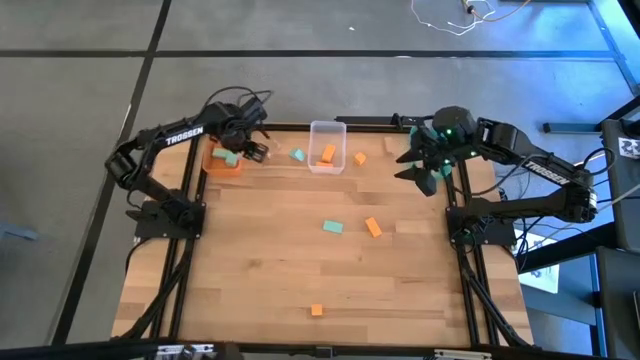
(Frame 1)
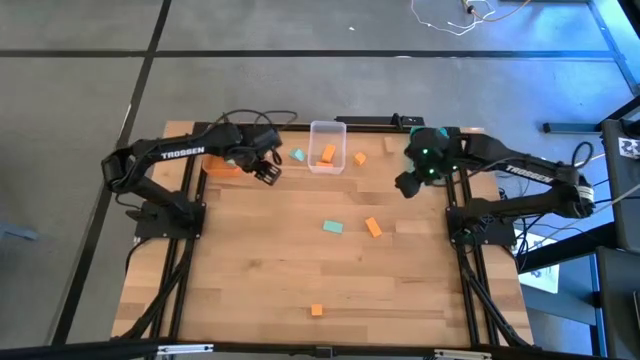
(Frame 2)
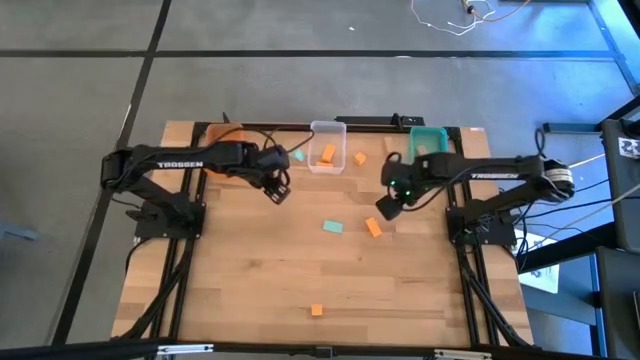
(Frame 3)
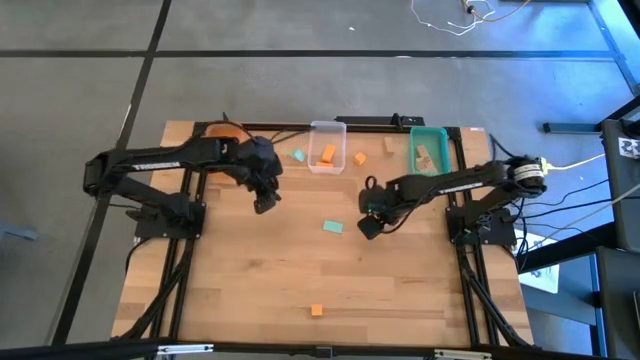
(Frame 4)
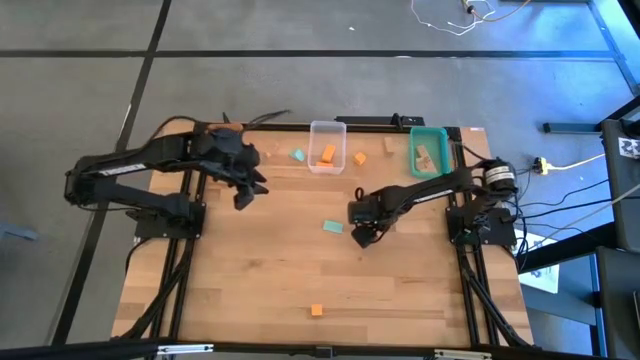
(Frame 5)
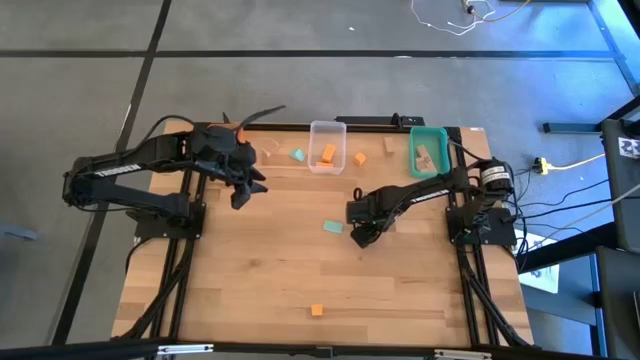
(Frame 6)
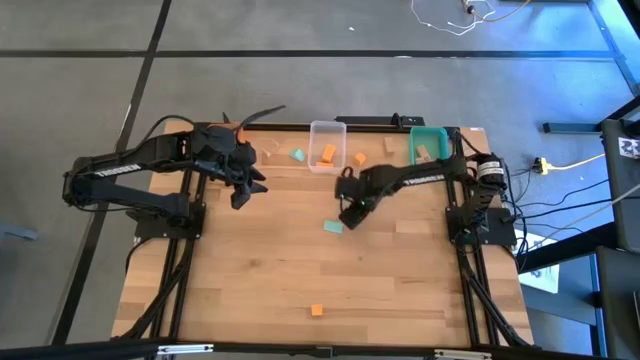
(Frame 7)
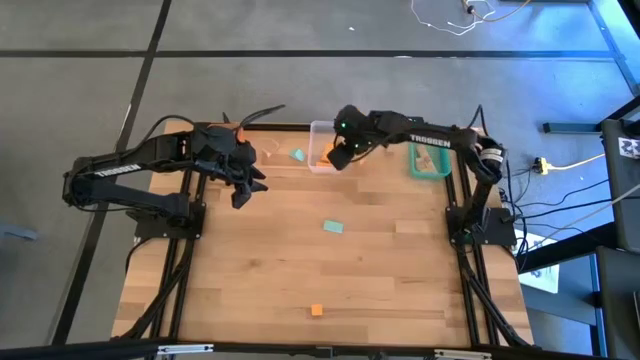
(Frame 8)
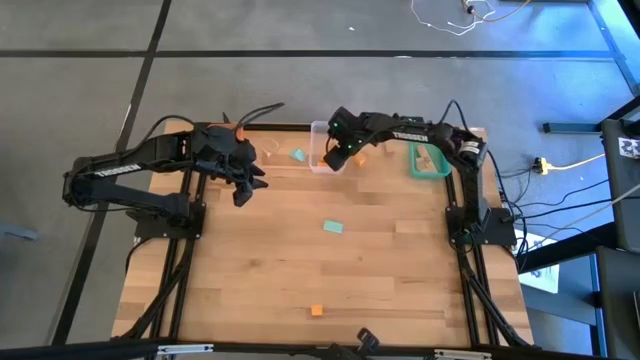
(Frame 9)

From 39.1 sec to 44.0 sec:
Task: Sort & place blocks by color
Put the orange block into the transparent bin

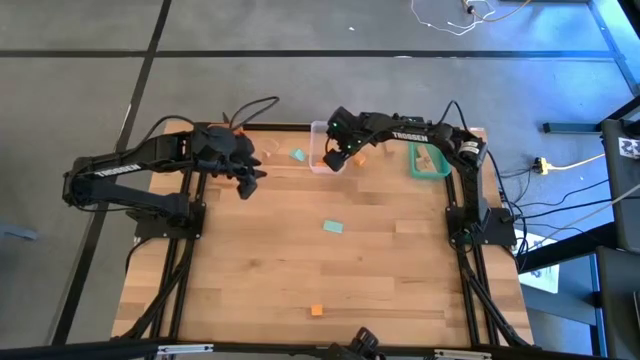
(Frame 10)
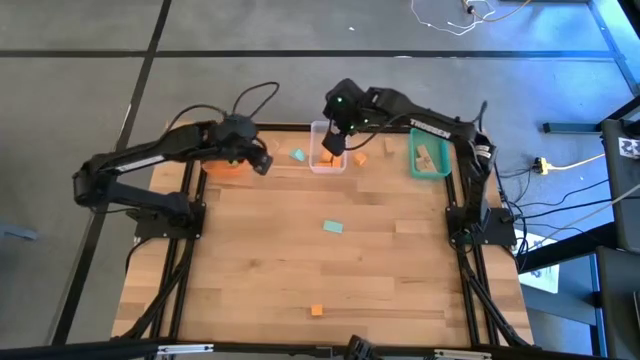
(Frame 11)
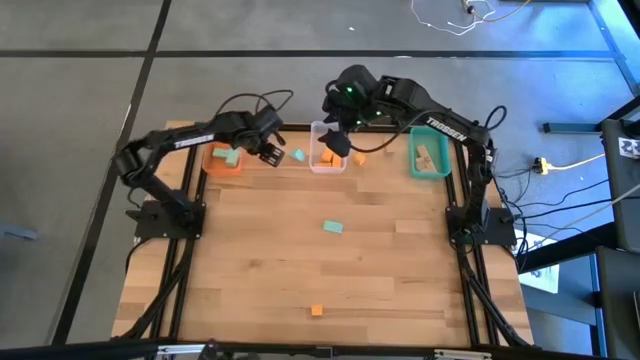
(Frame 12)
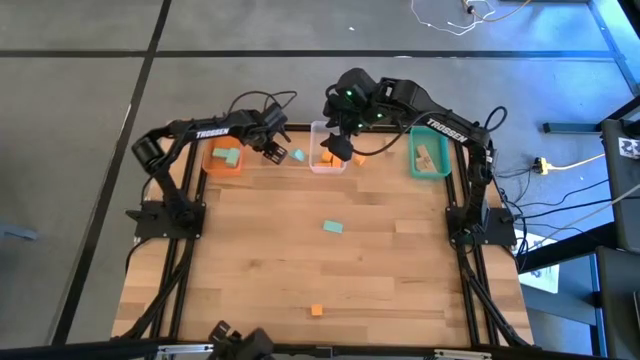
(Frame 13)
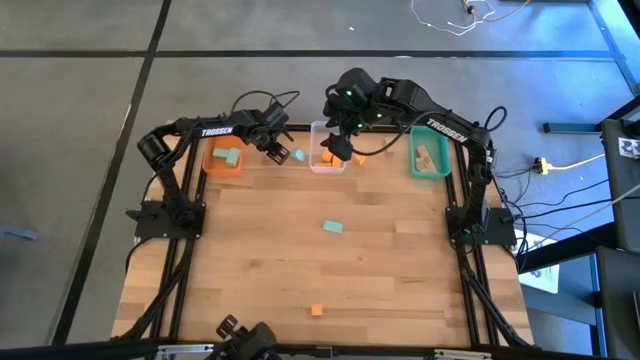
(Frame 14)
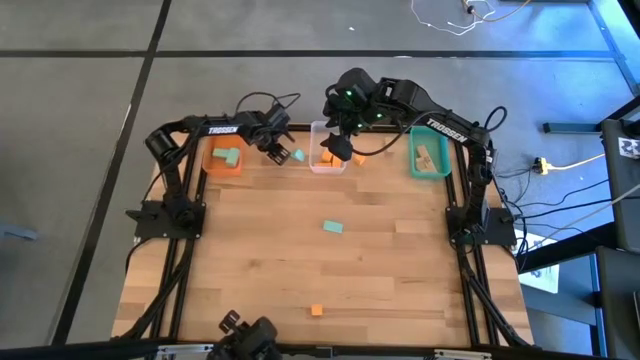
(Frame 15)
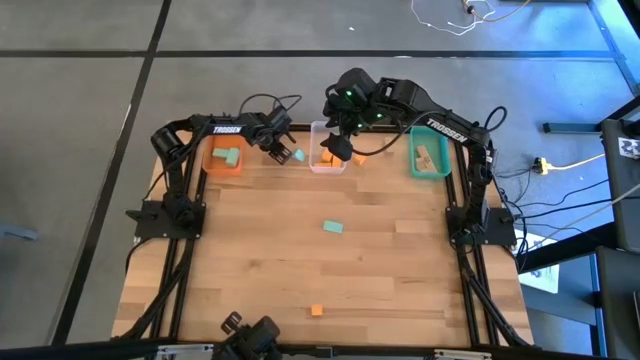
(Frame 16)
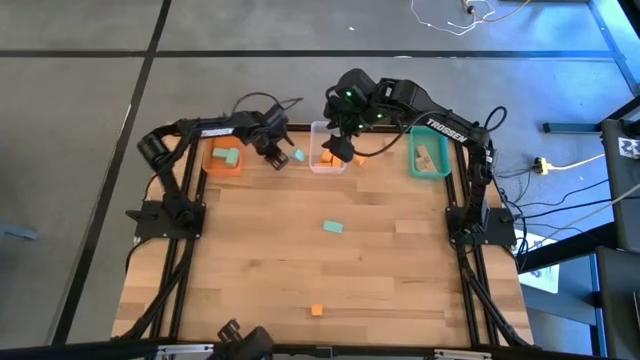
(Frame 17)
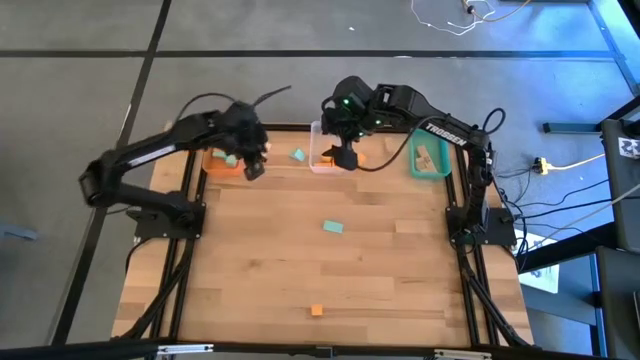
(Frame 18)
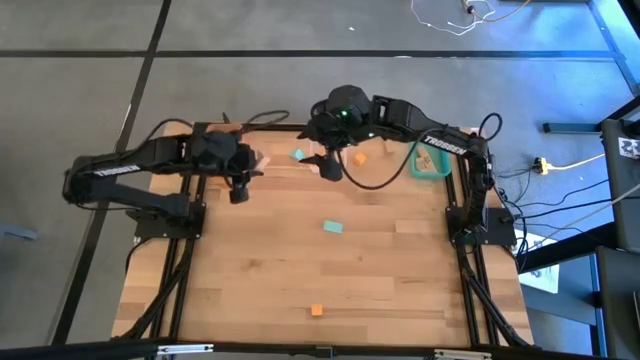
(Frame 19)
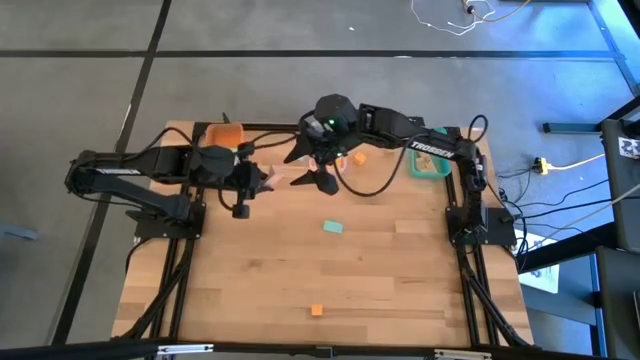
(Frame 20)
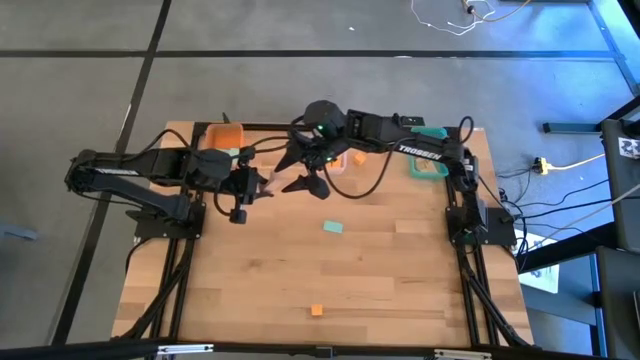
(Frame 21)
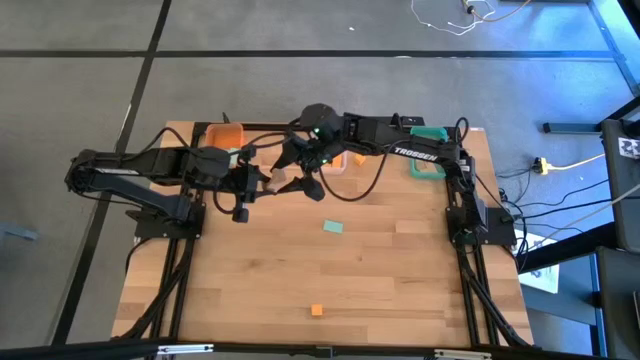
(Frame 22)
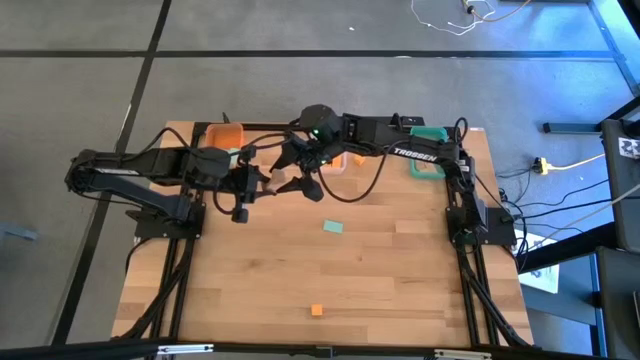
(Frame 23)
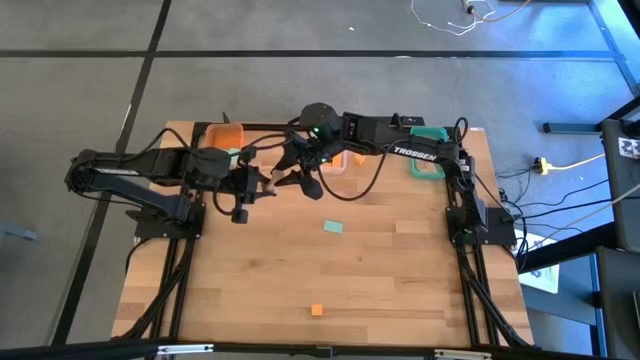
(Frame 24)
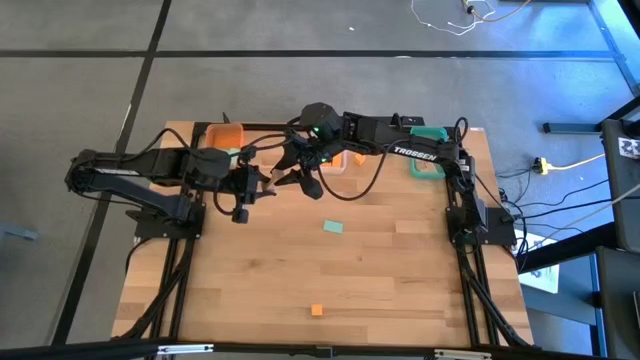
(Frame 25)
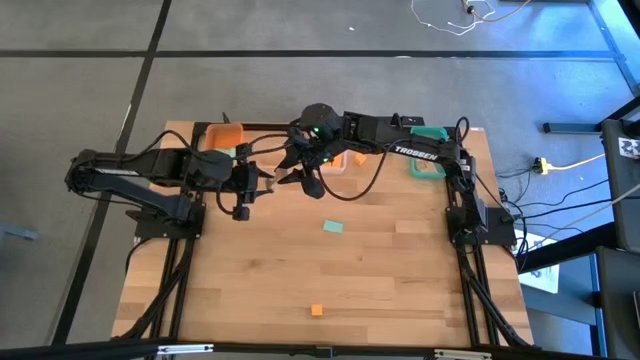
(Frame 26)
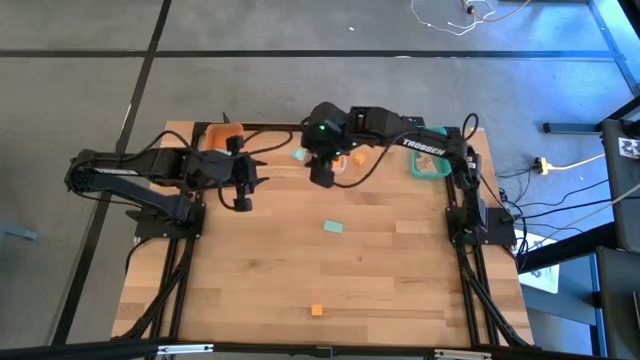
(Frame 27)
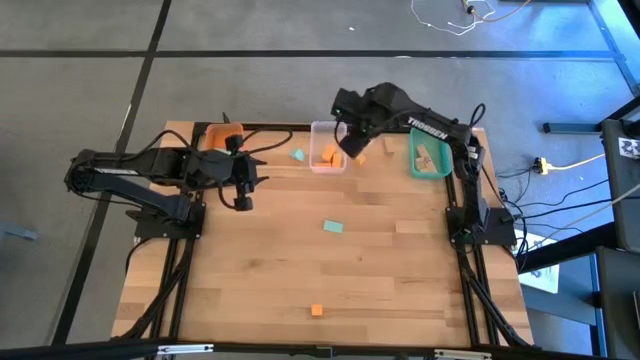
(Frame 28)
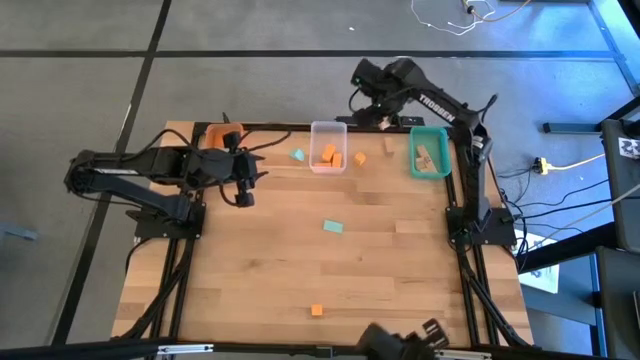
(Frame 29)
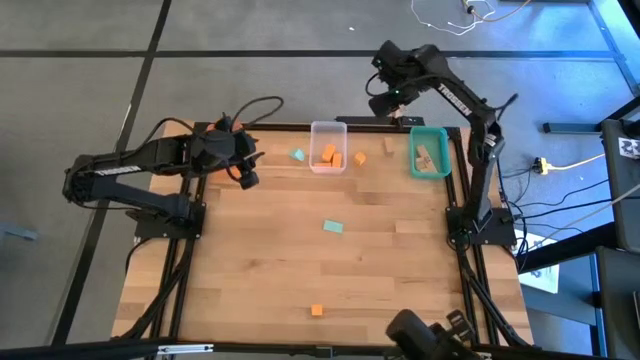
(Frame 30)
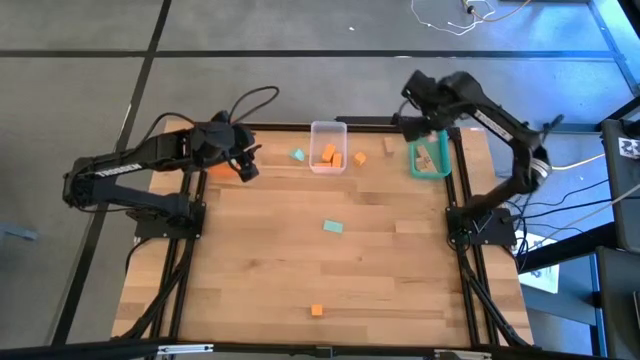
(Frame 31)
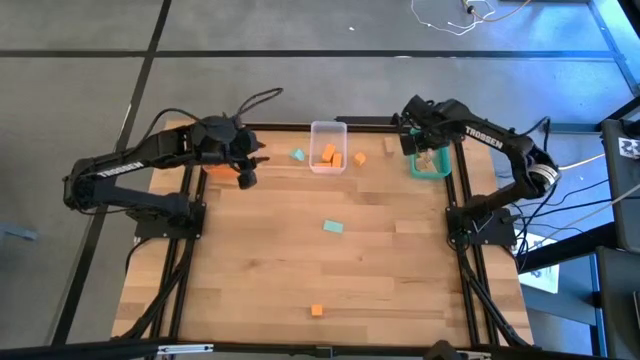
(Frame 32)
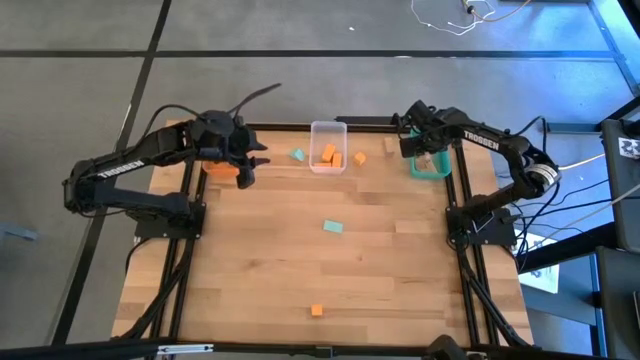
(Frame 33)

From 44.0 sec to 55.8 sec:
Put the brown block into the blue bin

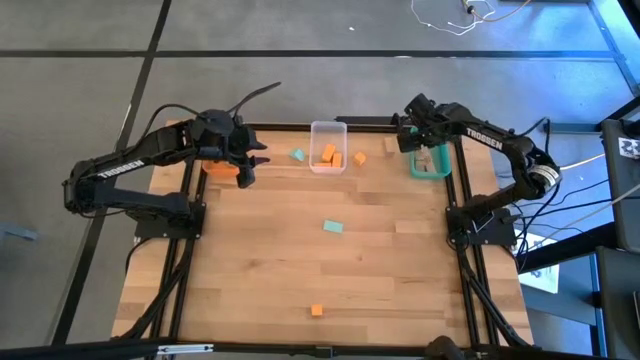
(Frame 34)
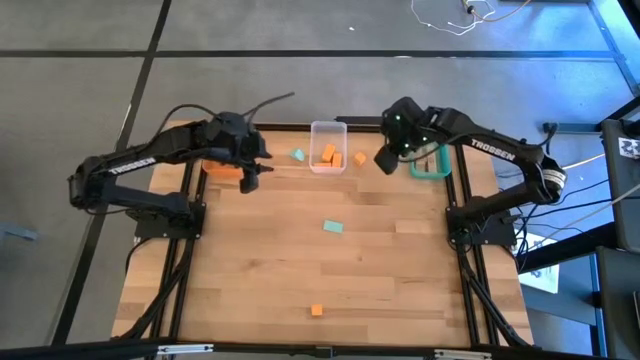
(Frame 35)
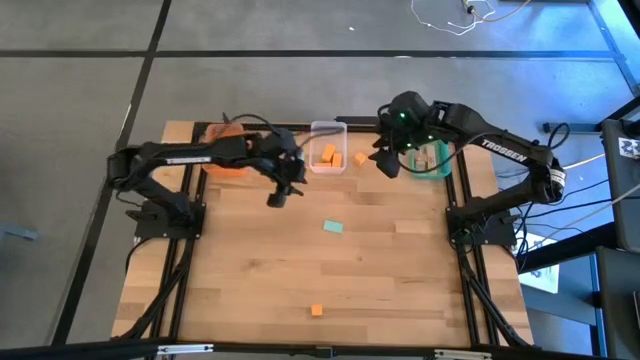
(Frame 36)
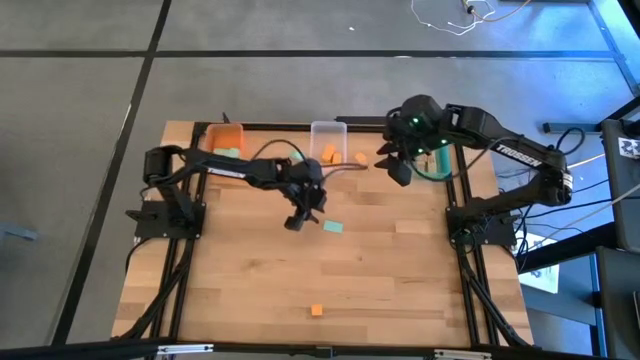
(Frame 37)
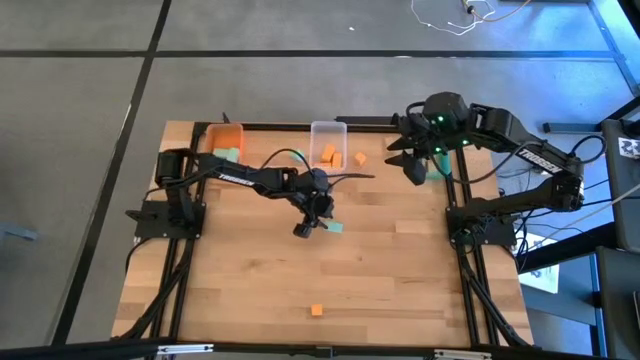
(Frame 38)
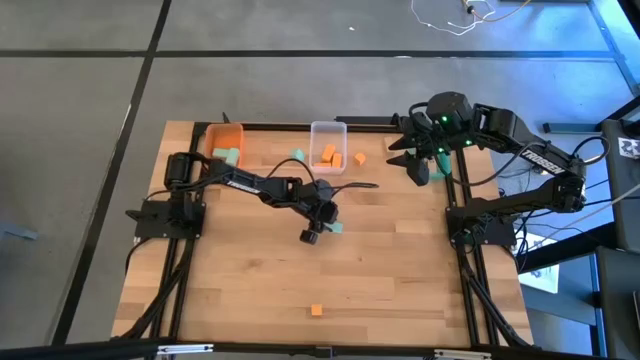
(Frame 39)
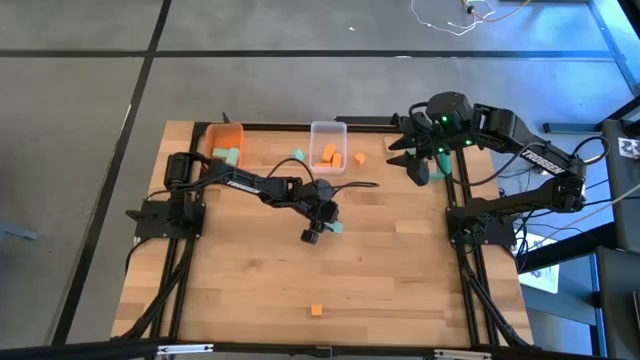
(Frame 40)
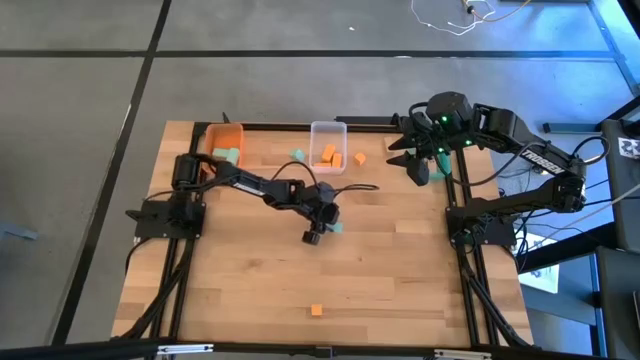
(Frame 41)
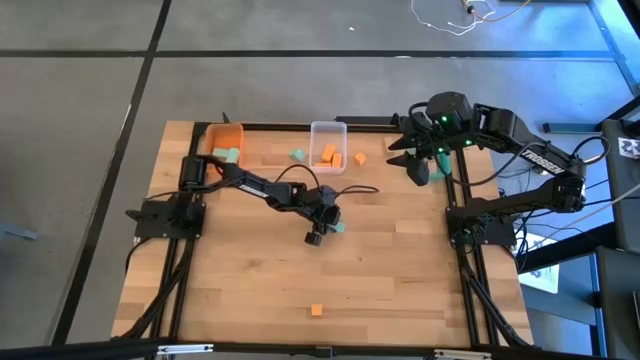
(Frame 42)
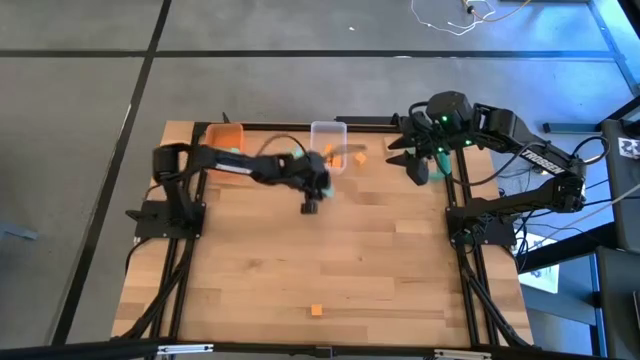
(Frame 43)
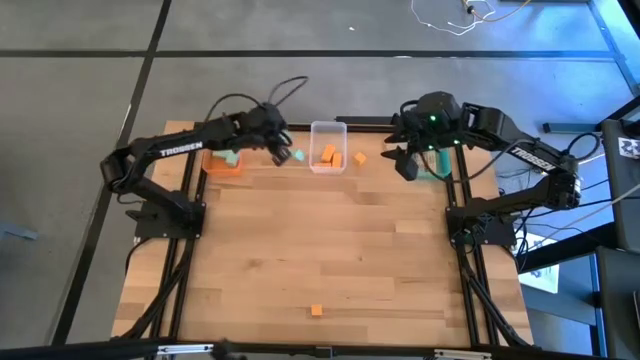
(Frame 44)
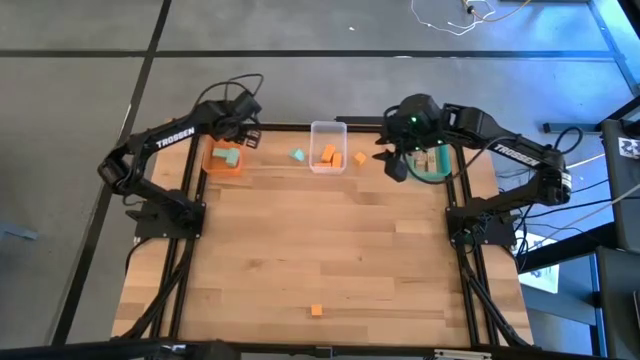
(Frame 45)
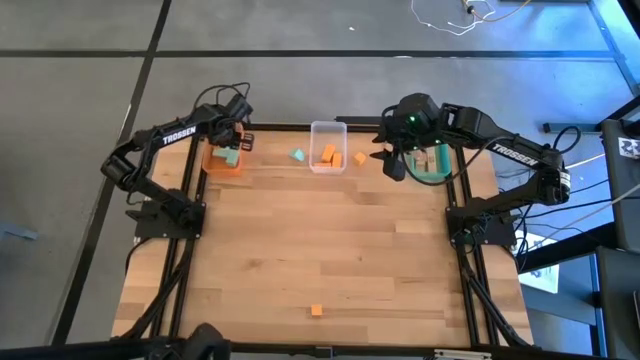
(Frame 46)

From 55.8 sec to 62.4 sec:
Put the blue block into the orange bin
